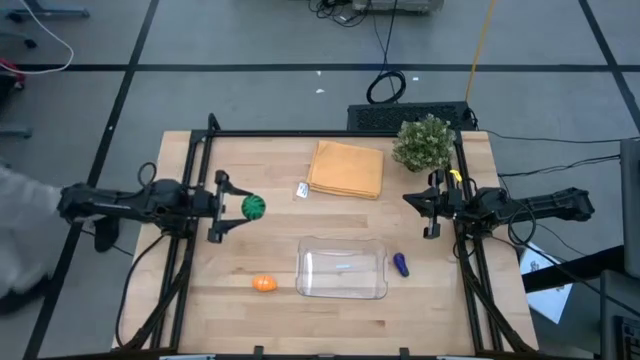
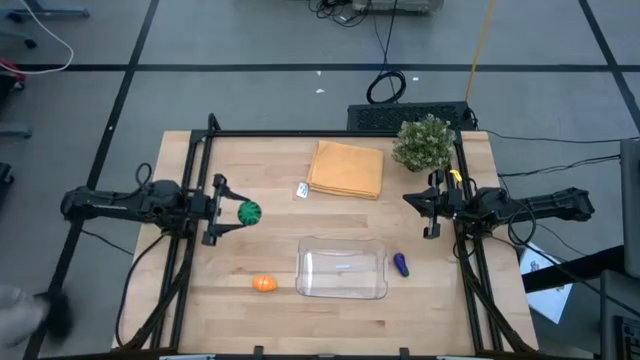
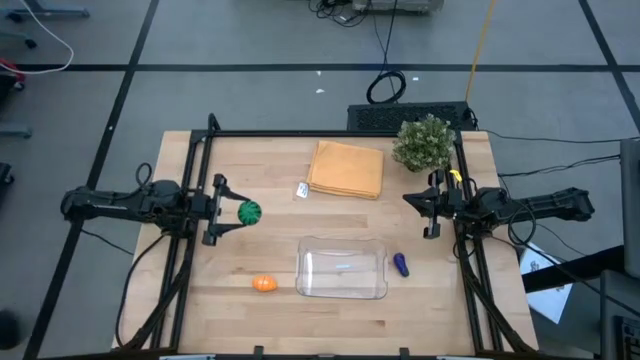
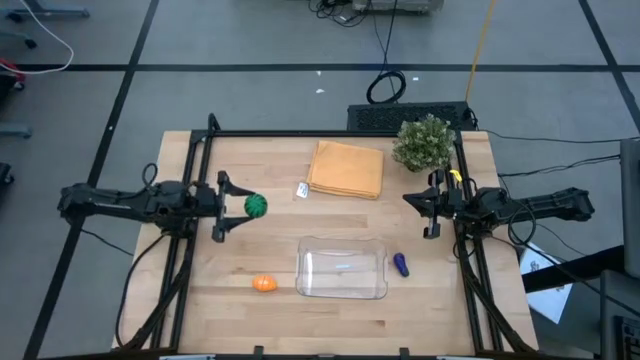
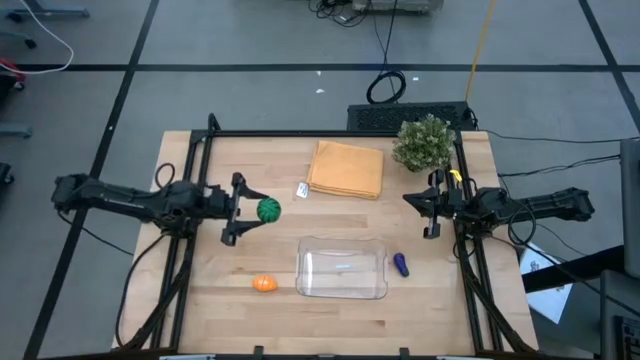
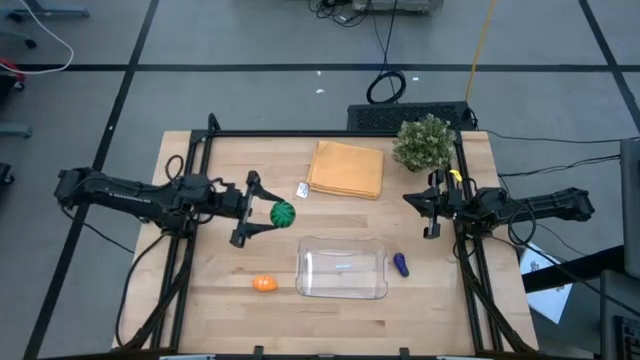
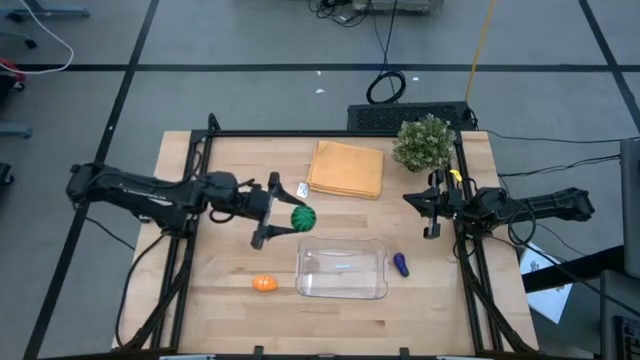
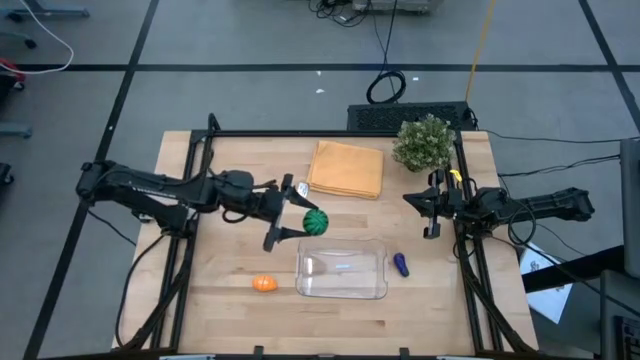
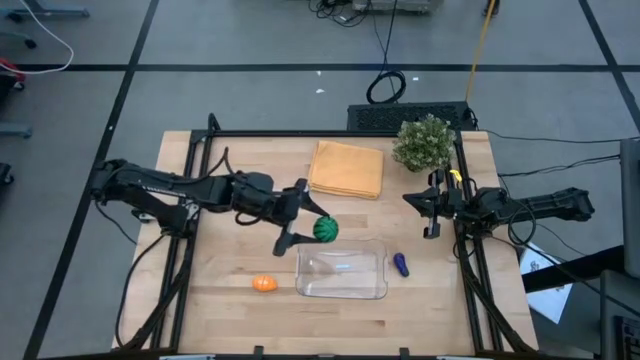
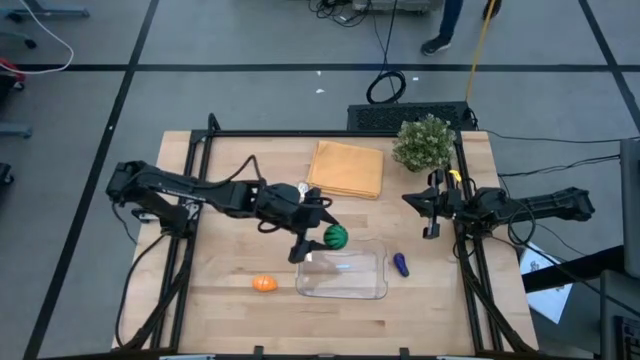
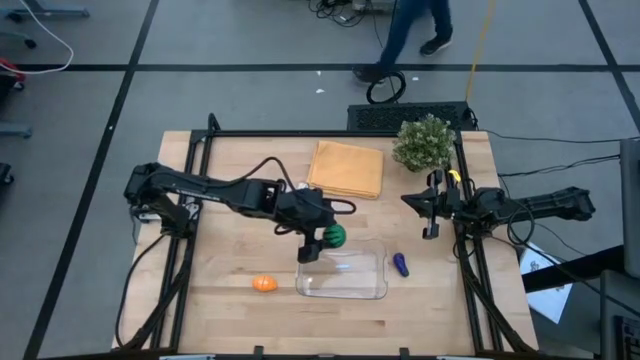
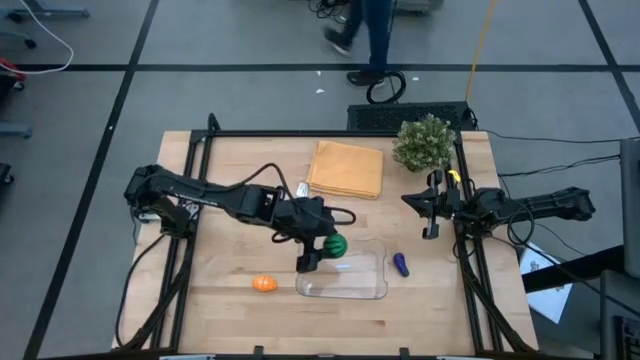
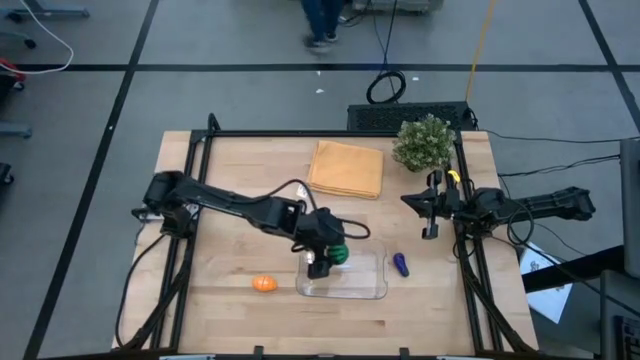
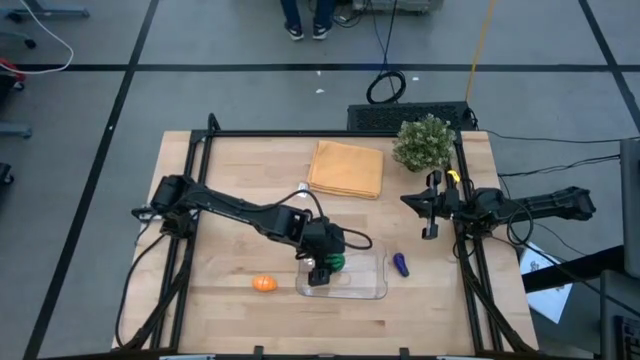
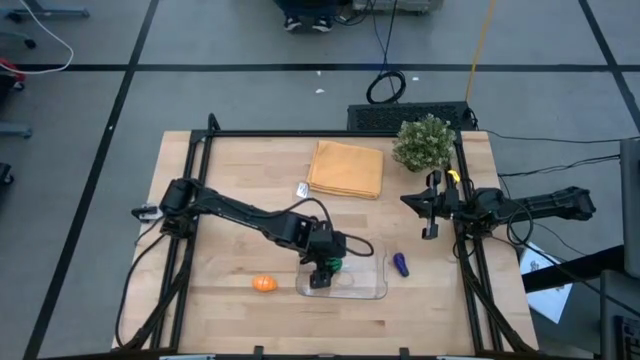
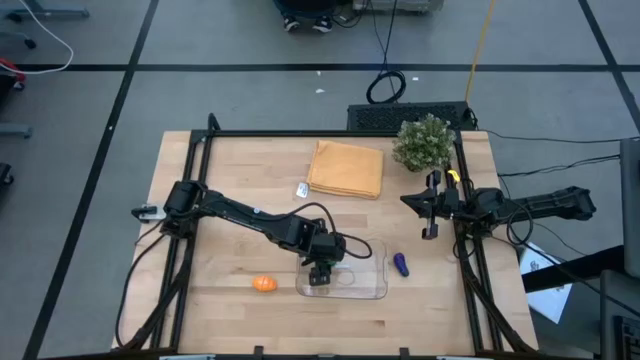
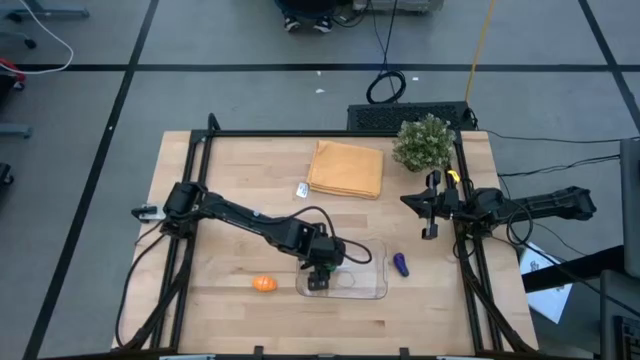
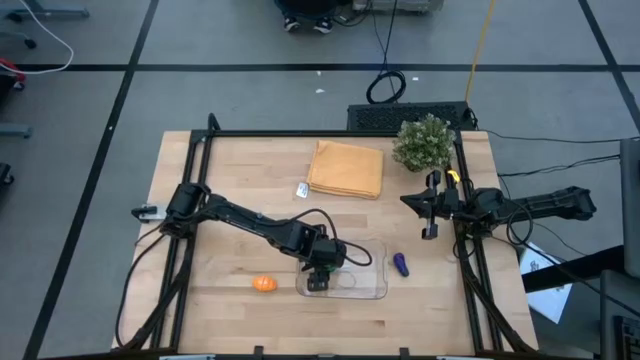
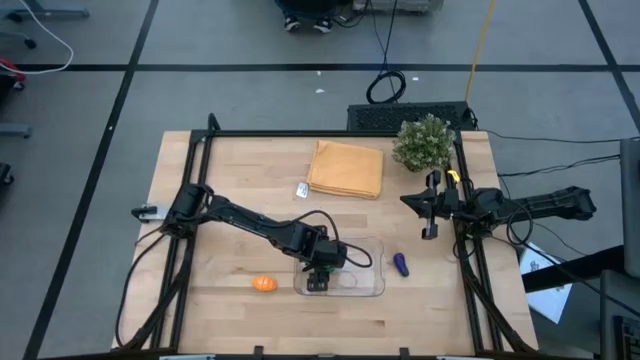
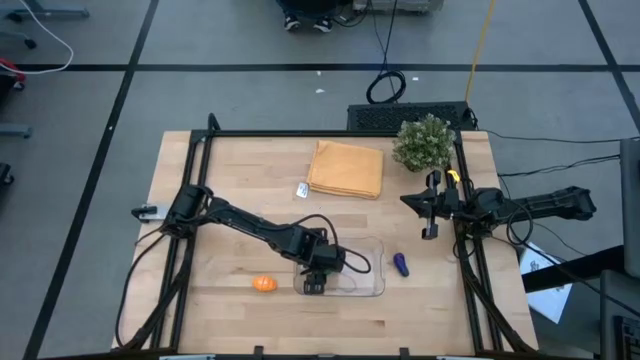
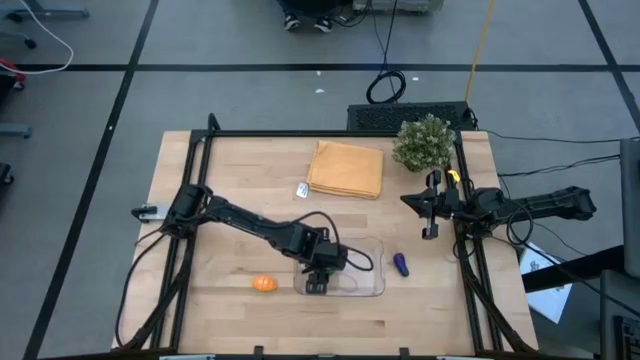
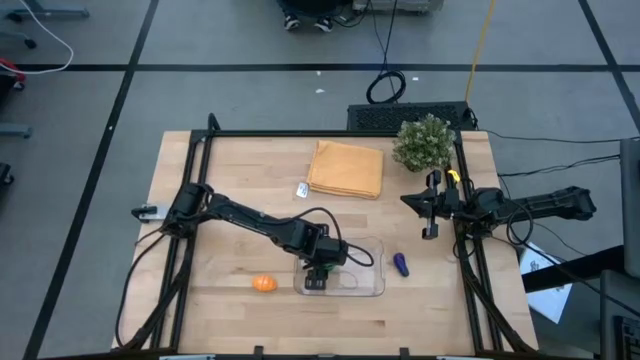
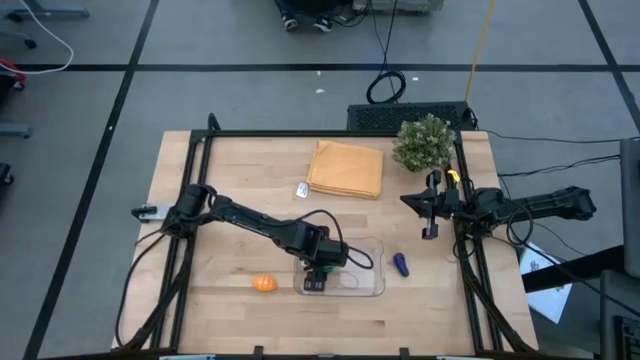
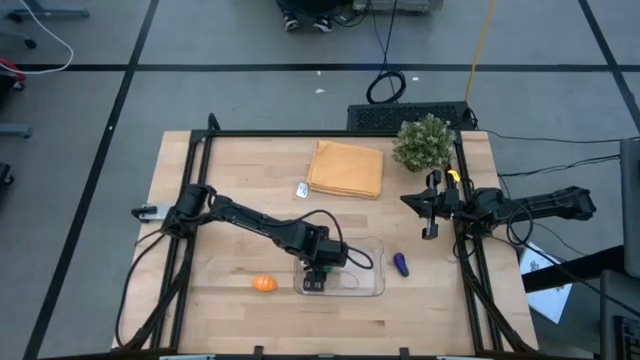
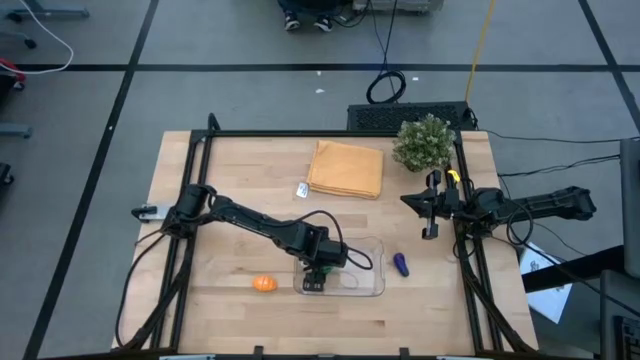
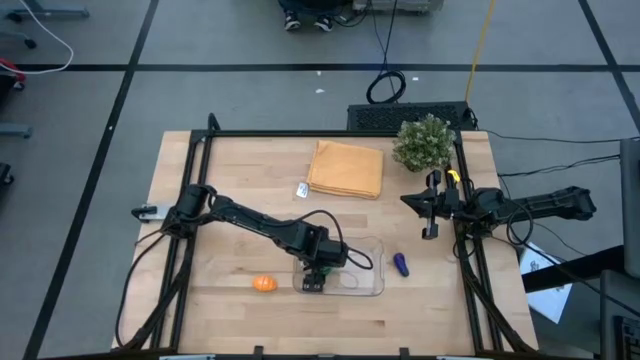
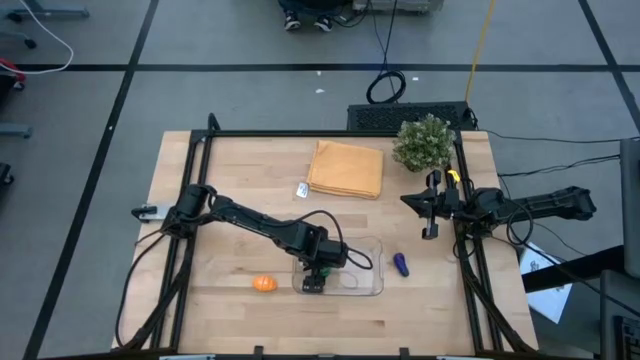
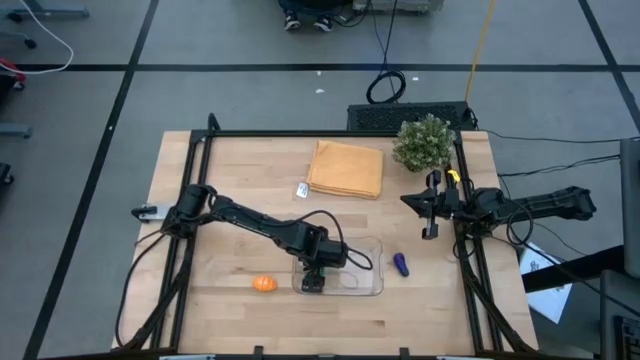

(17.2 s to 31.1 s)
Task: Pick and placing Produce into tupperware
Put the watermelon into the transparent bin
